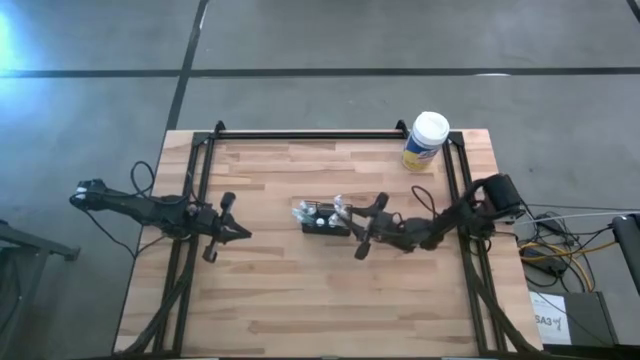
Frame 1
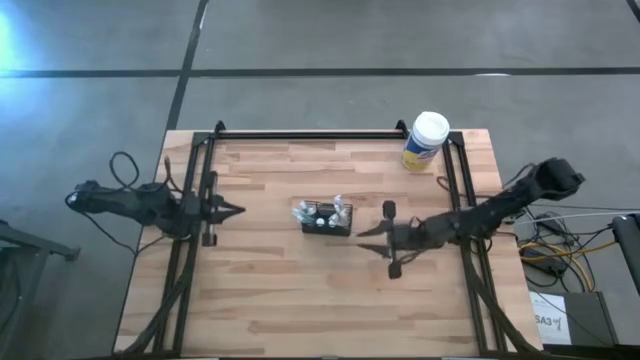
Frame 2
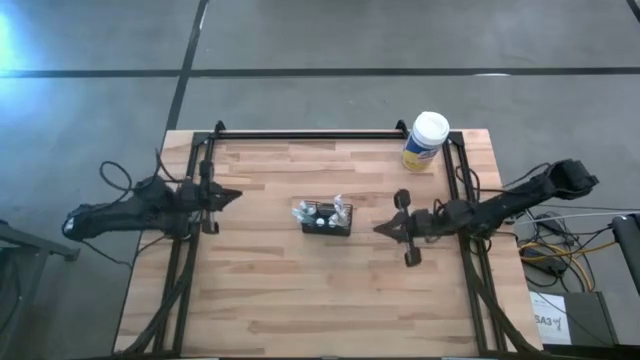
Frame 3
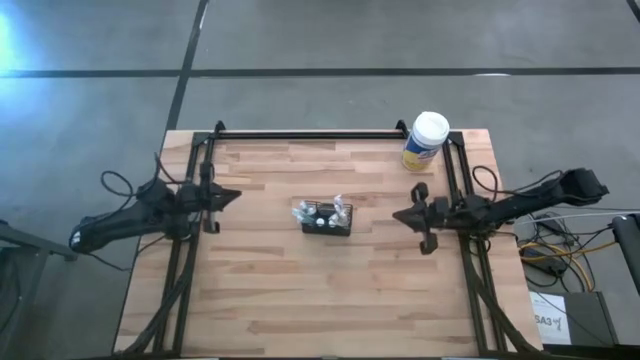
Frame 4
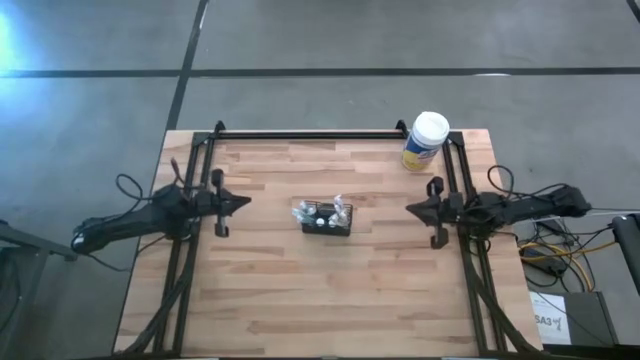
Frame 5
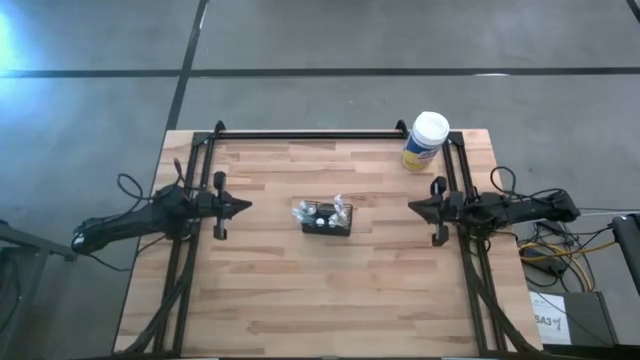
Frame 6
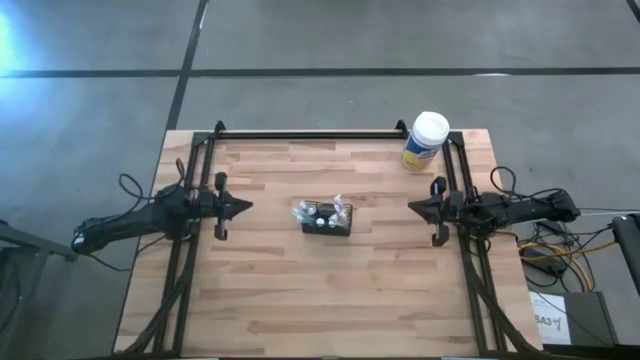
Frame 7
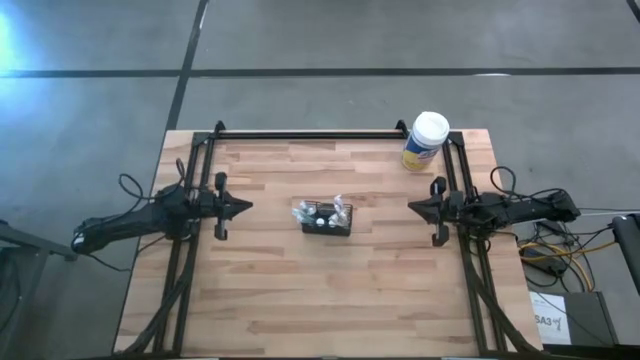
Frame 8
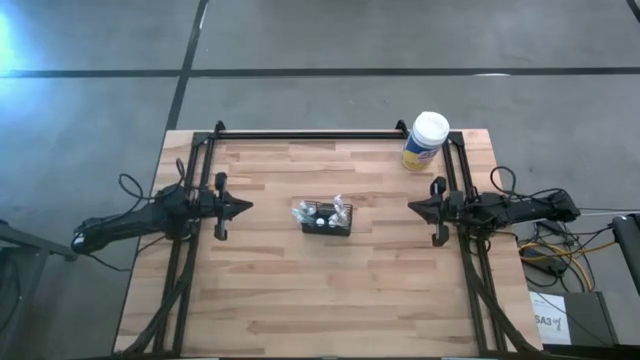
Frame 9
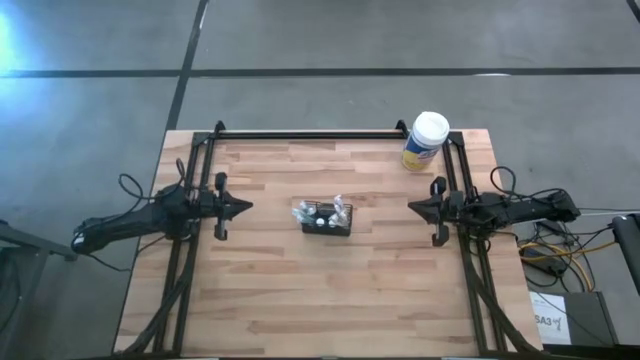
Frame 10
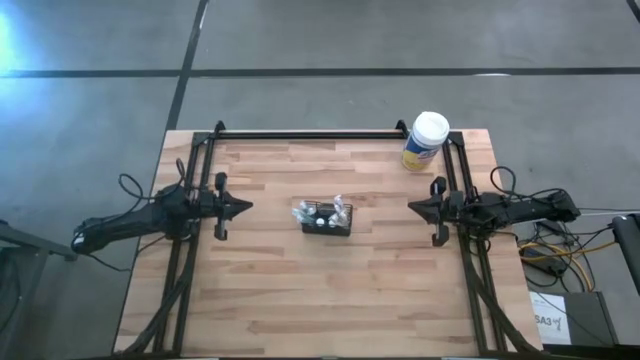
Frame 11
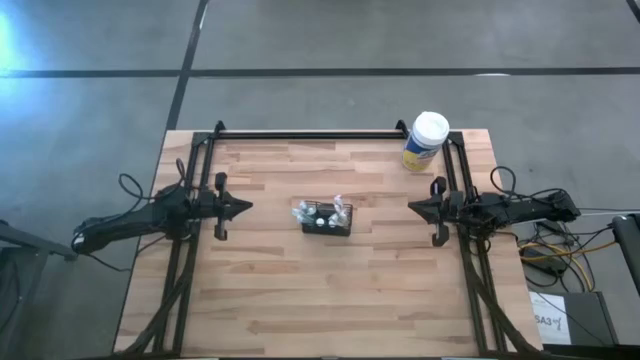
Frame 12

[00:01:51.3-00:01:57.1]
Task: Pick & Place toothbrushing station
Return to Home Position

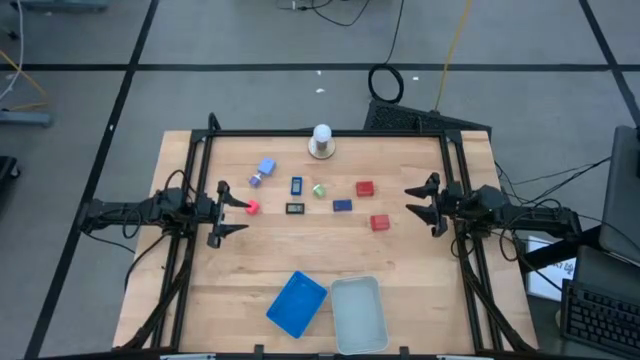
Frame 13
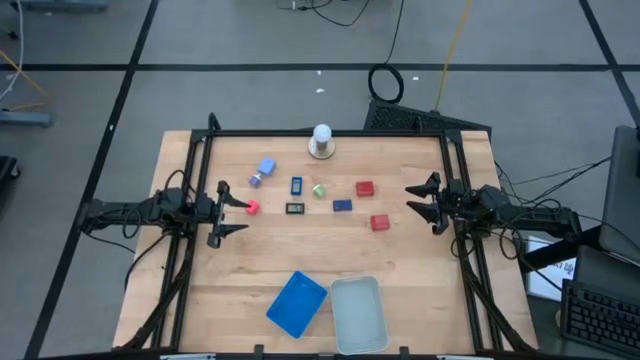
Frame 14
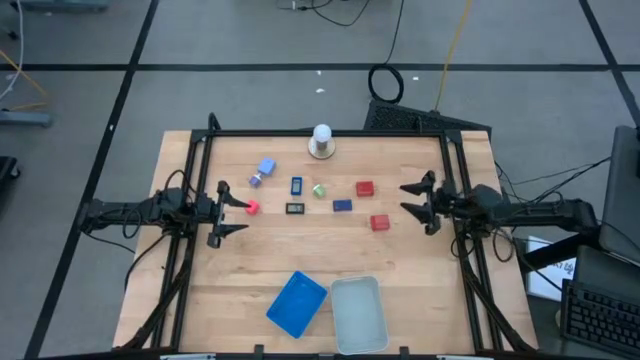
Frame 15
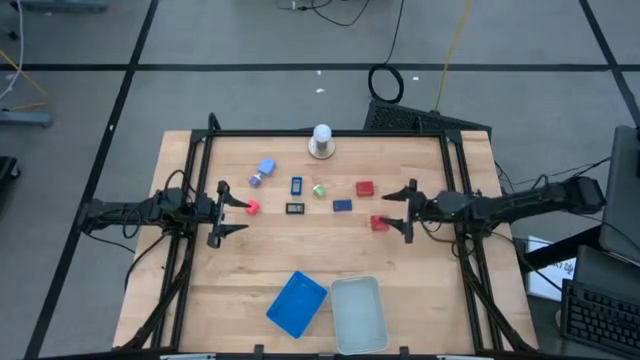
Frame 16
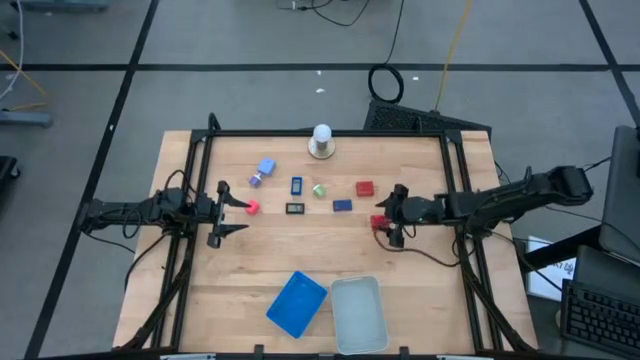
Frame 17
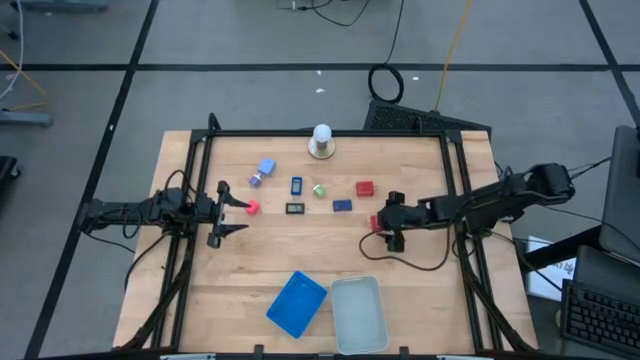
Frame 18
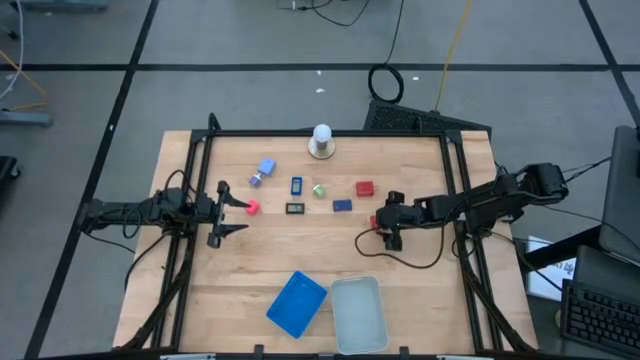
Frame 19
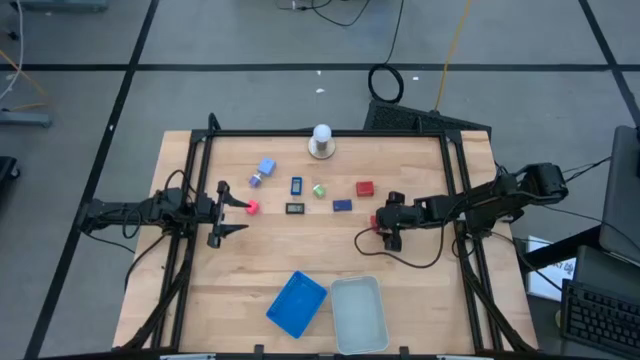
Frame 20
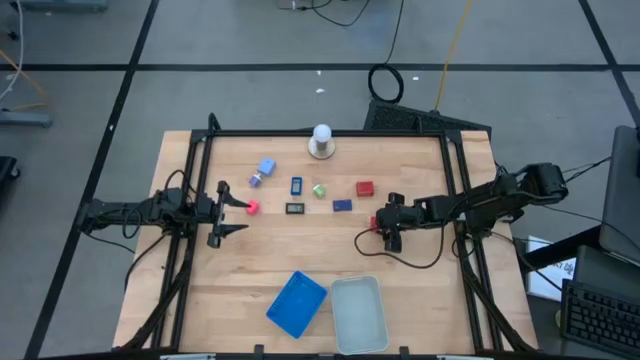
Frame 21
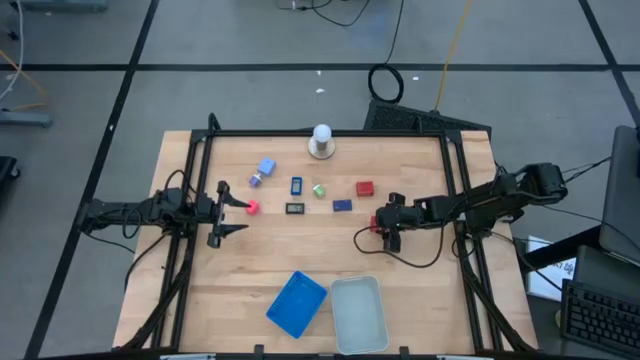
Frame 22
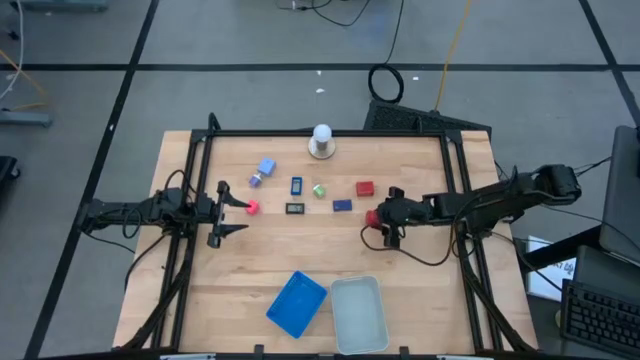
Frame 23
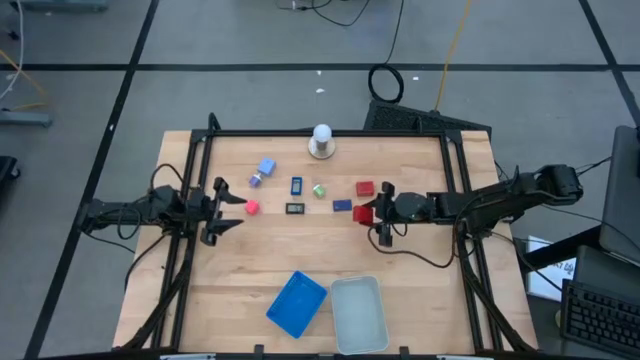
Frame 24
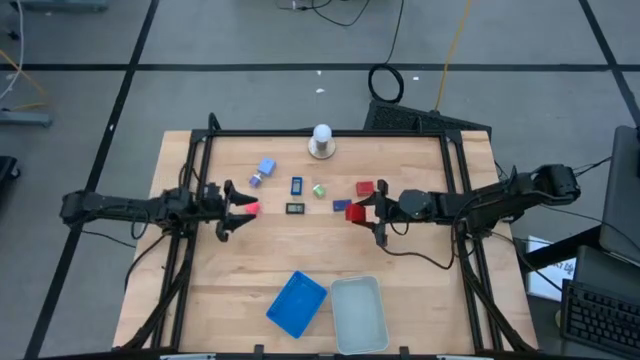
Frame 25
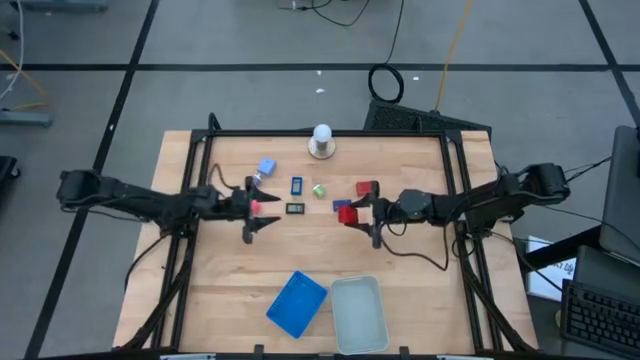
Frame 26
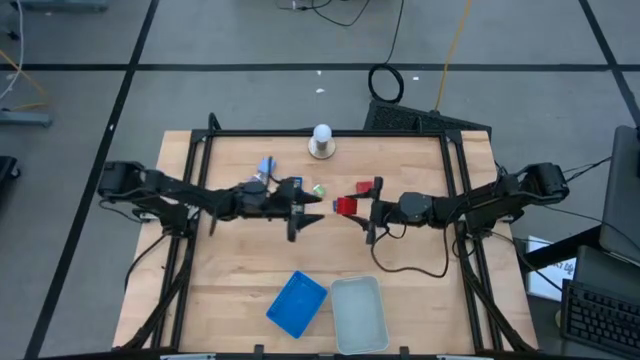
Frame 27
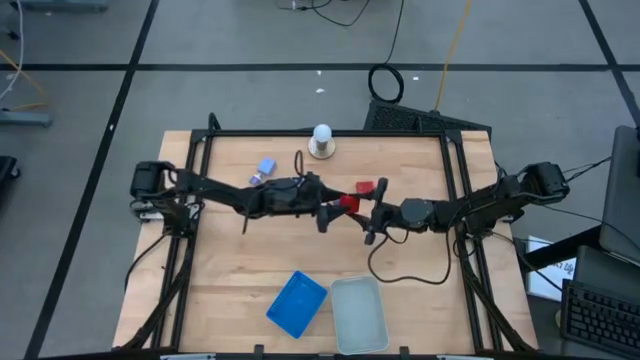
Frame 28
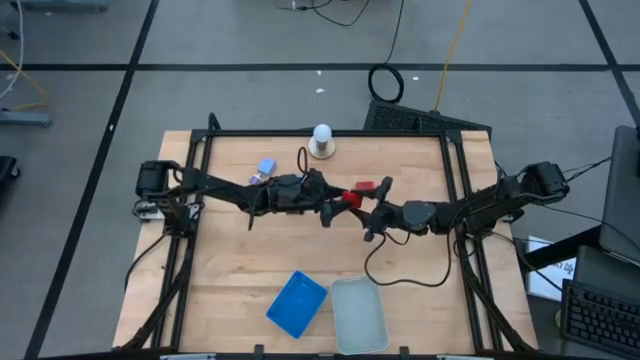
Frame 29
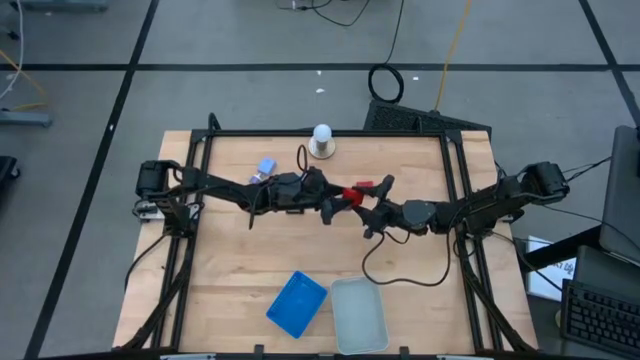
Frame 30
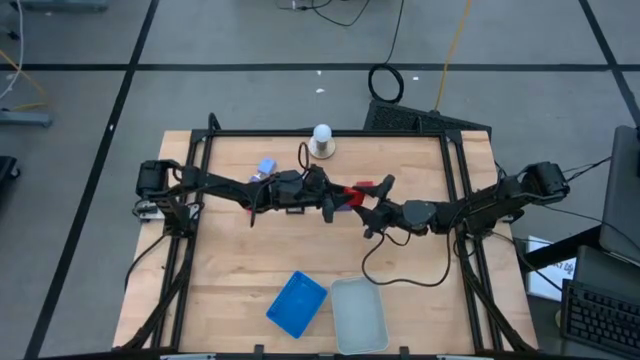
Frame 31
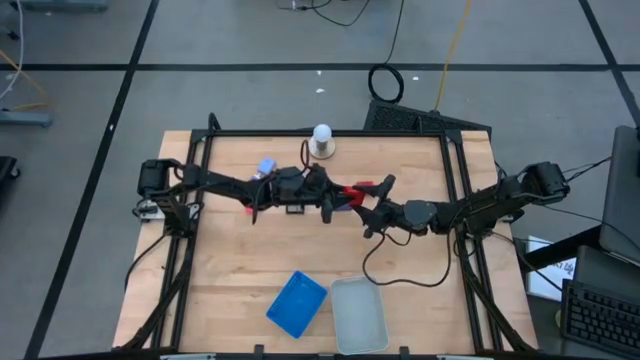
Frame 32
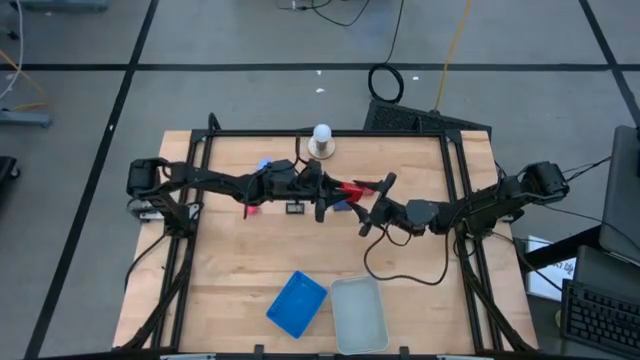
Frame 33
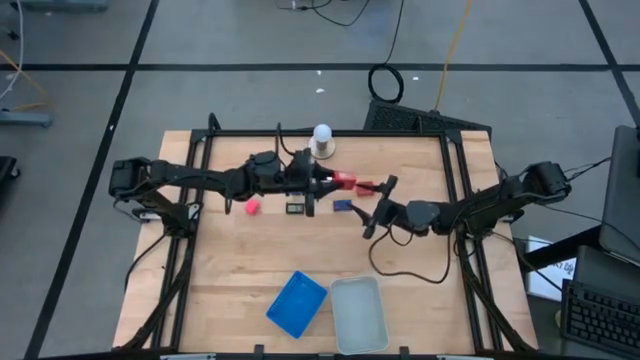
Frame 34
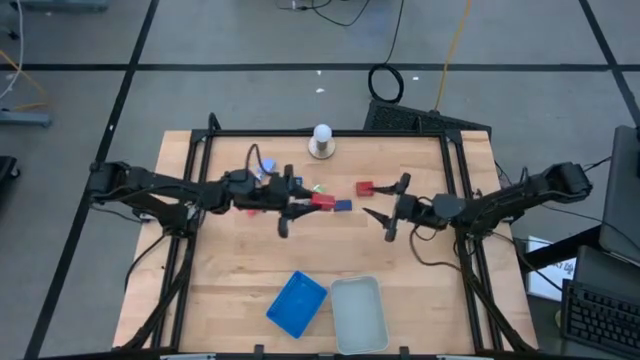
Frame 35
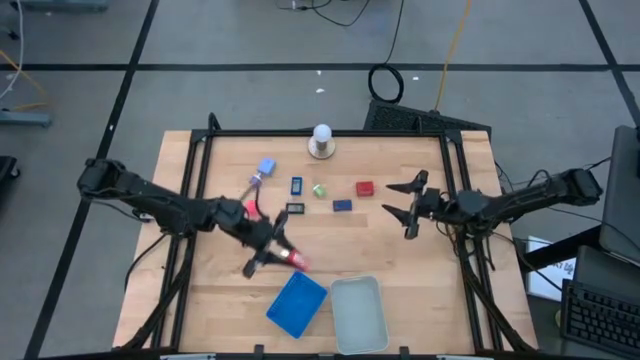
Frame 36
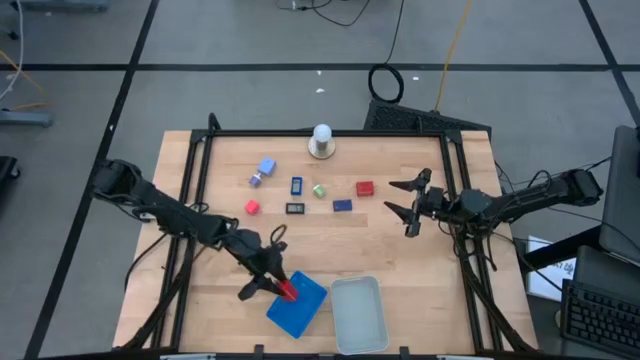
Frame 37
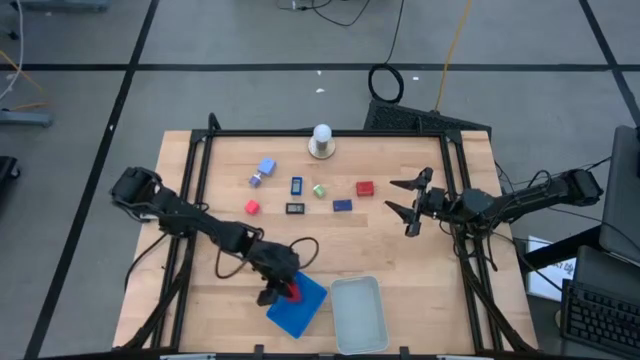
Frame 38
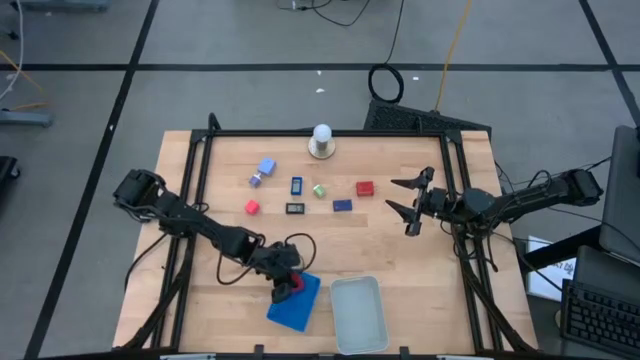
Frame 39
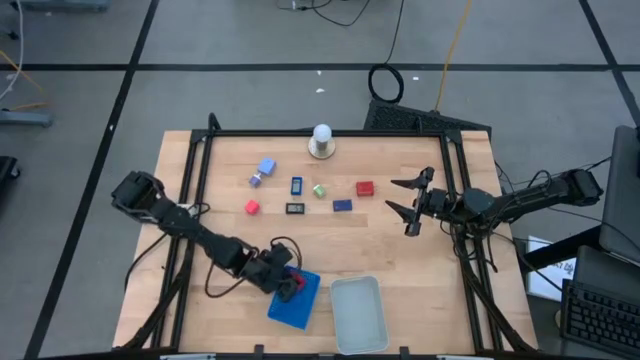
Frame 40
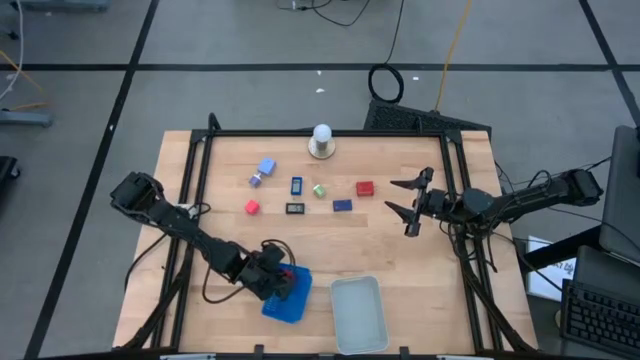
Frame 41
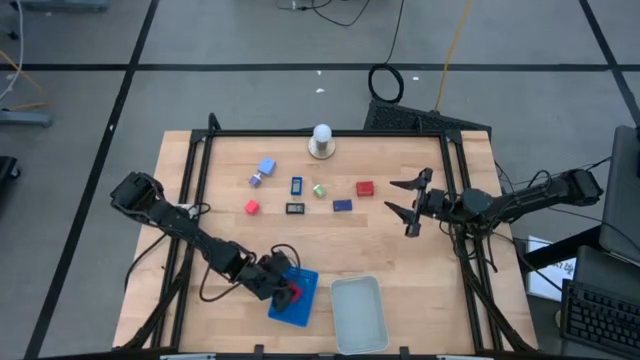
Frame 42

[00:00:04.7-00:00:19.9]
Task: Pick & Place Office items
Put the bottom red charger adapter into the blue bin

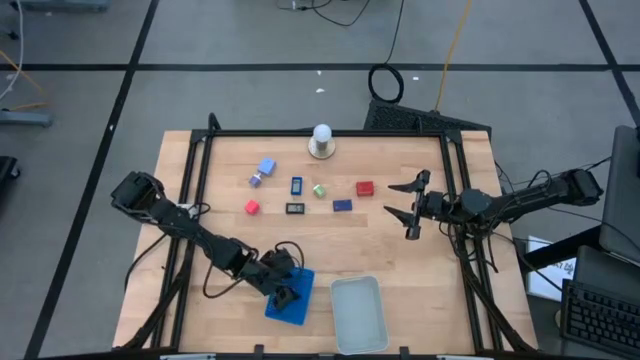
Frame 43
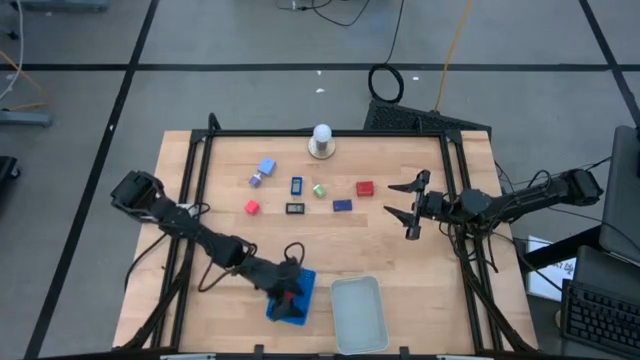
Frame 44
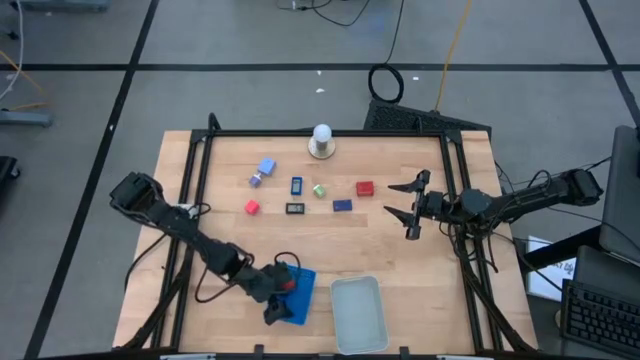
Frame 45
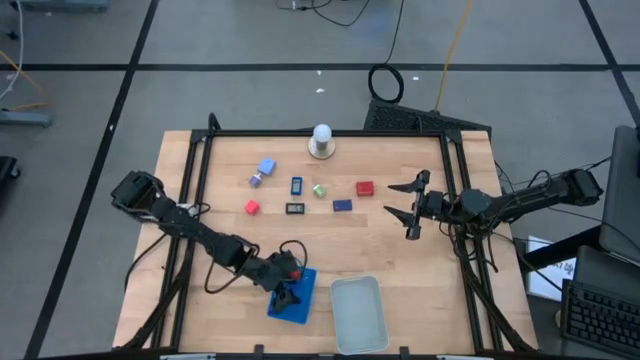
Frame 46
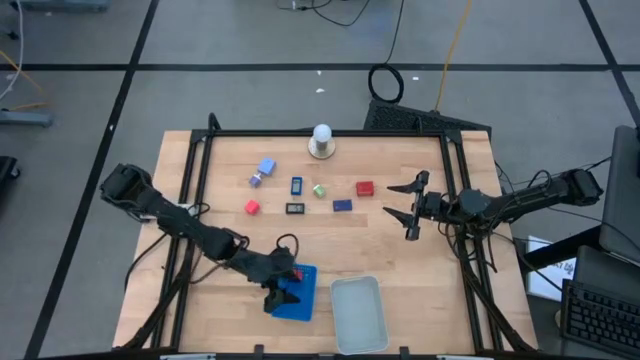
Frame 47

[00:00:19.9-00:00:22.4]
Adjust the blue bin
